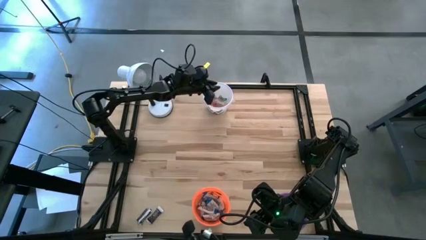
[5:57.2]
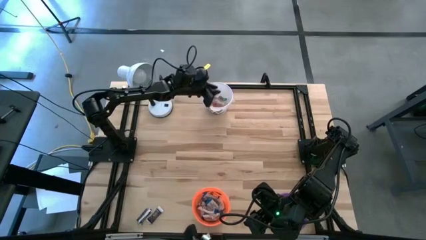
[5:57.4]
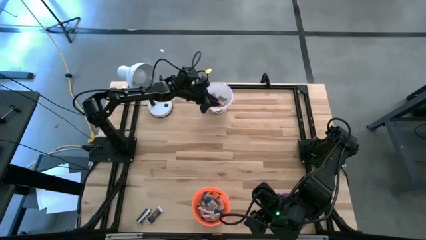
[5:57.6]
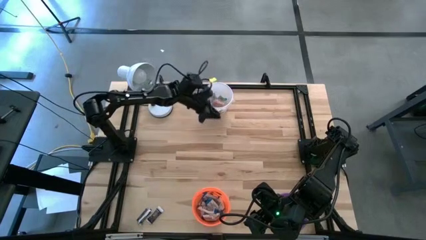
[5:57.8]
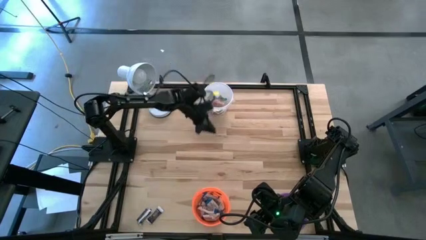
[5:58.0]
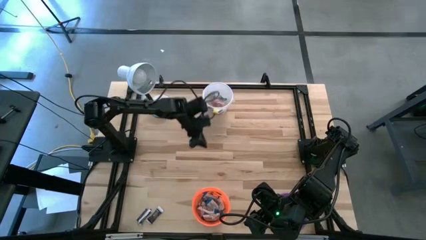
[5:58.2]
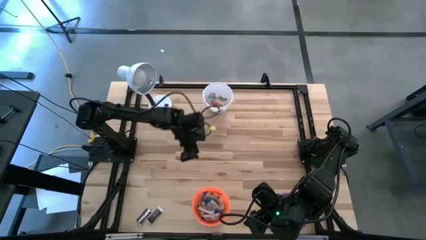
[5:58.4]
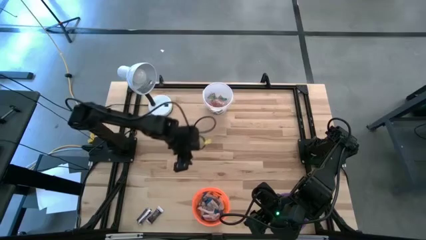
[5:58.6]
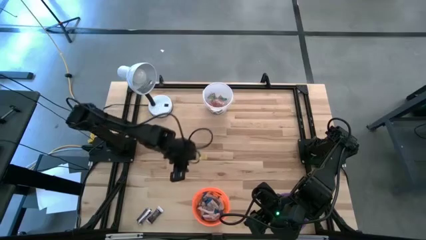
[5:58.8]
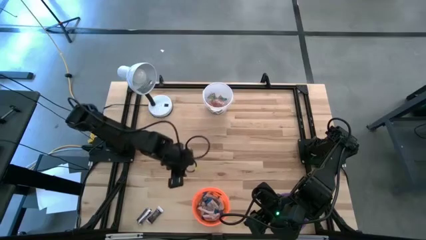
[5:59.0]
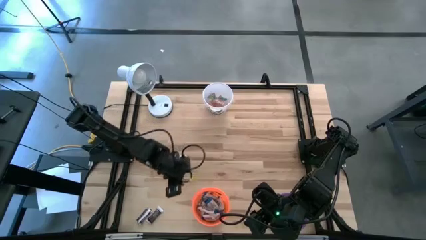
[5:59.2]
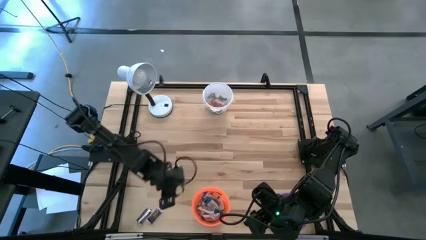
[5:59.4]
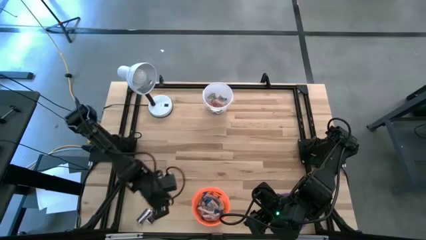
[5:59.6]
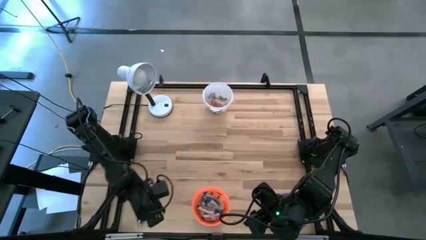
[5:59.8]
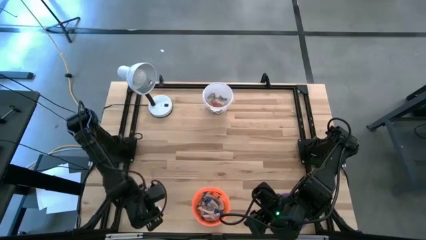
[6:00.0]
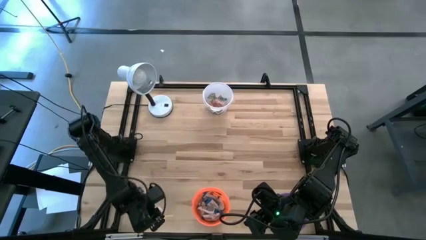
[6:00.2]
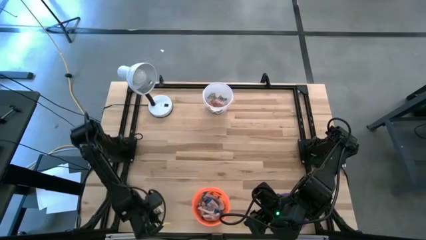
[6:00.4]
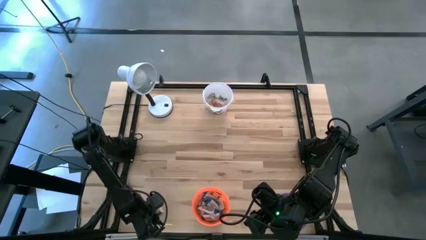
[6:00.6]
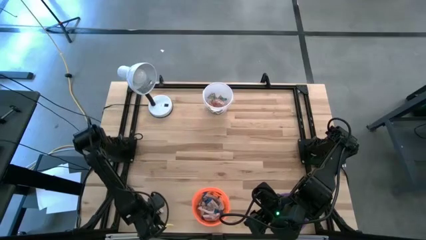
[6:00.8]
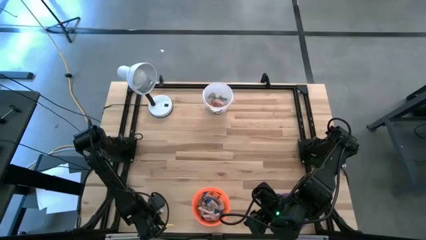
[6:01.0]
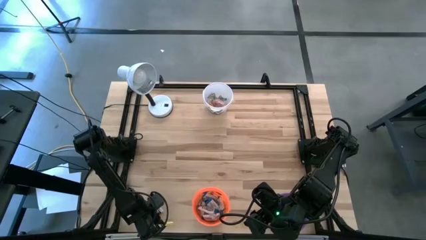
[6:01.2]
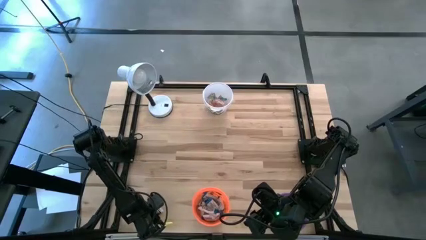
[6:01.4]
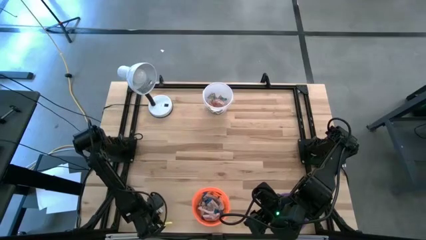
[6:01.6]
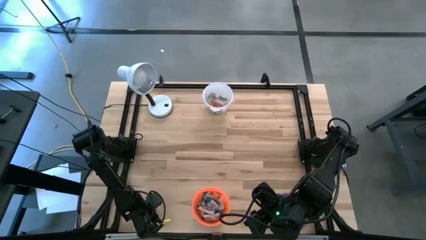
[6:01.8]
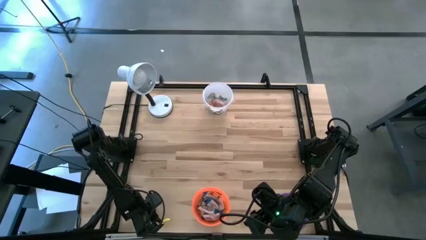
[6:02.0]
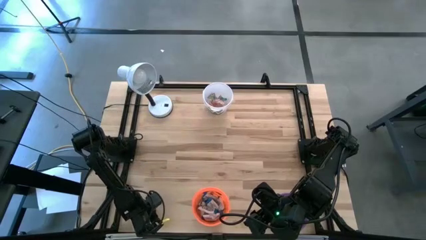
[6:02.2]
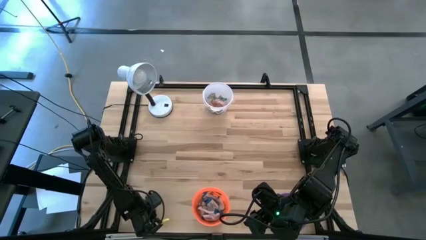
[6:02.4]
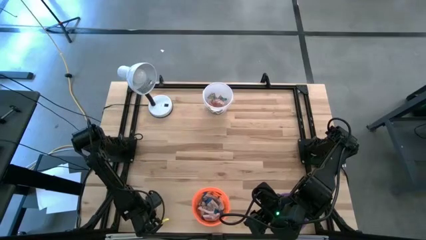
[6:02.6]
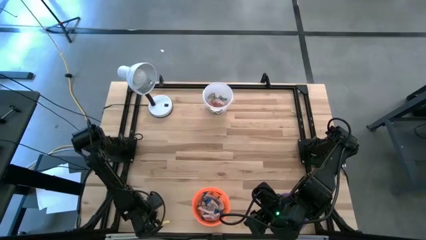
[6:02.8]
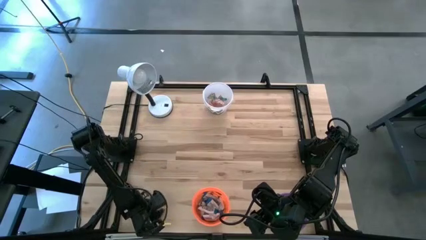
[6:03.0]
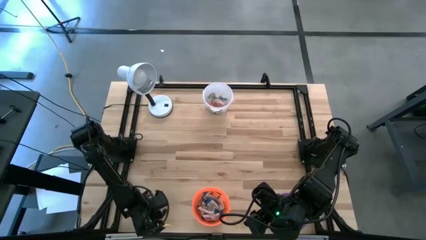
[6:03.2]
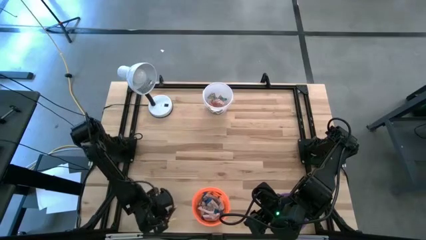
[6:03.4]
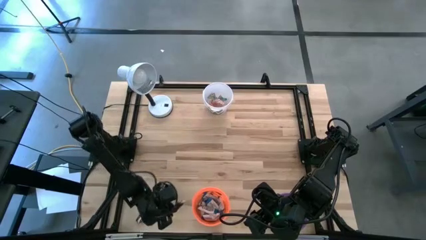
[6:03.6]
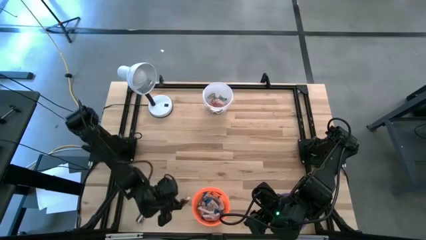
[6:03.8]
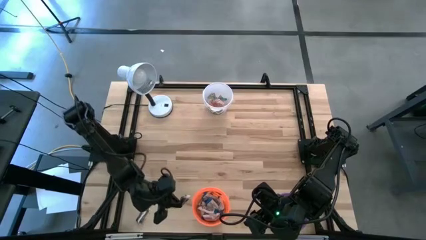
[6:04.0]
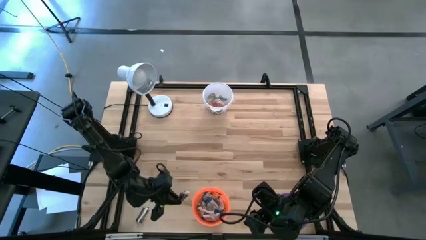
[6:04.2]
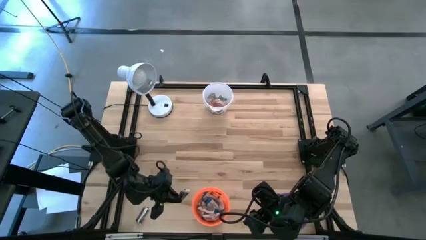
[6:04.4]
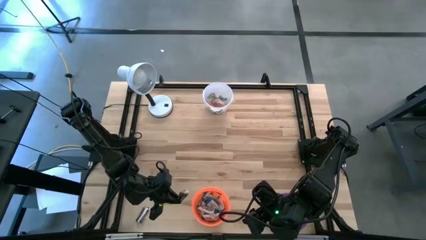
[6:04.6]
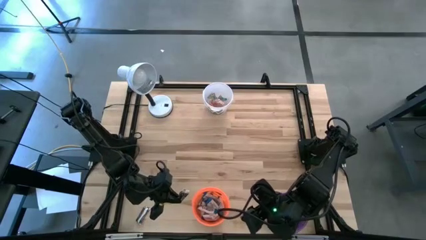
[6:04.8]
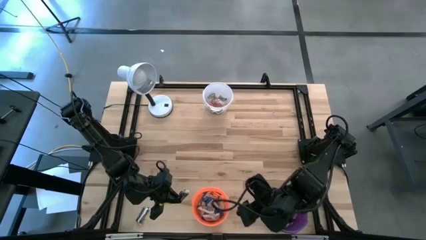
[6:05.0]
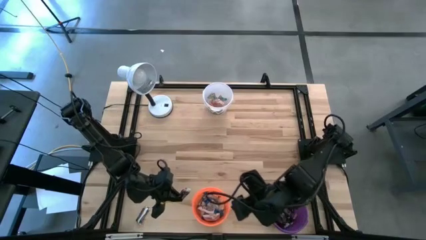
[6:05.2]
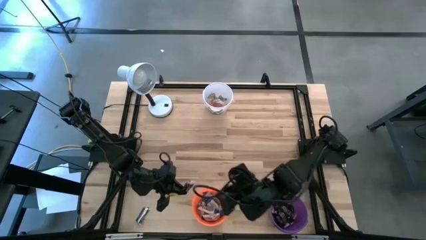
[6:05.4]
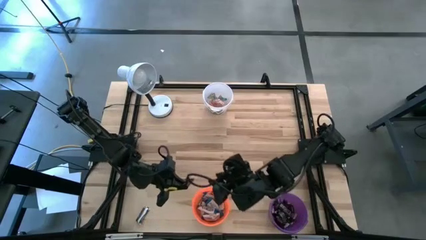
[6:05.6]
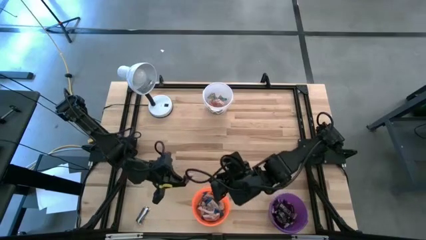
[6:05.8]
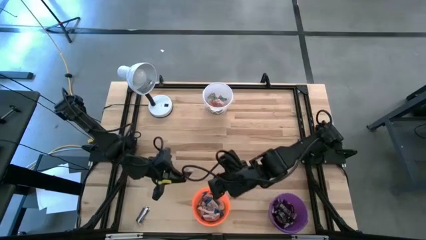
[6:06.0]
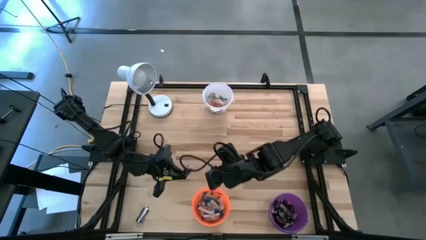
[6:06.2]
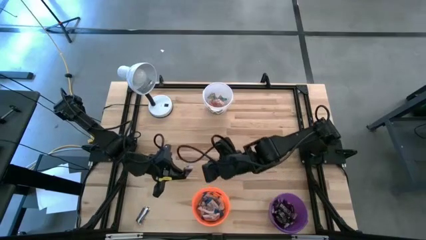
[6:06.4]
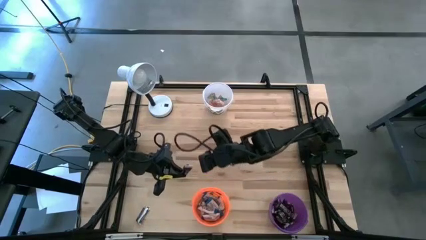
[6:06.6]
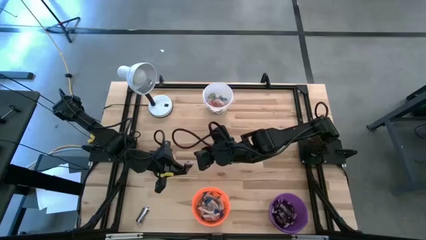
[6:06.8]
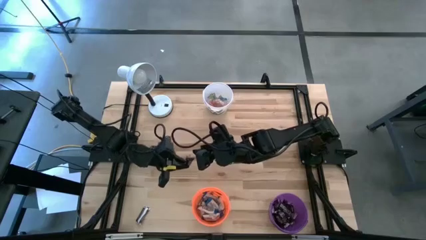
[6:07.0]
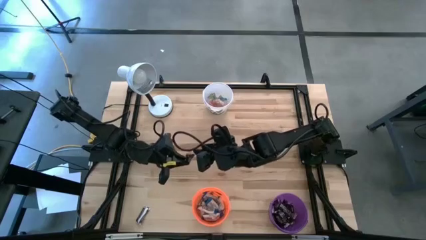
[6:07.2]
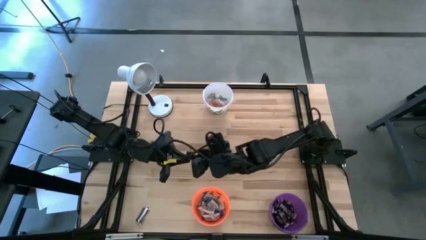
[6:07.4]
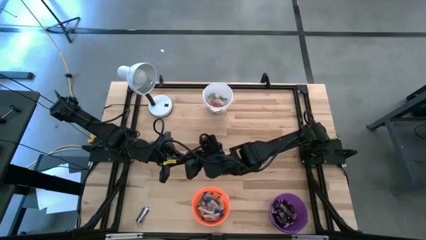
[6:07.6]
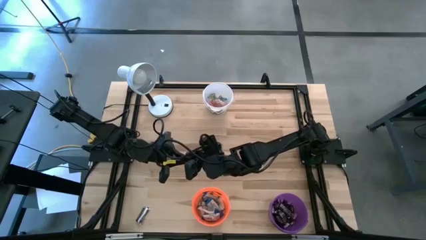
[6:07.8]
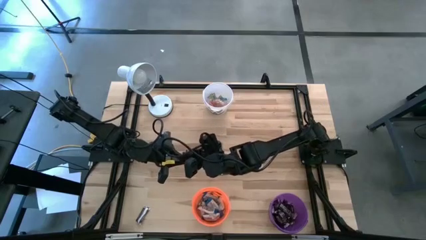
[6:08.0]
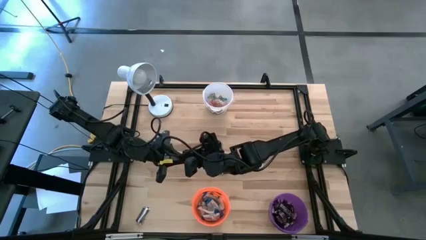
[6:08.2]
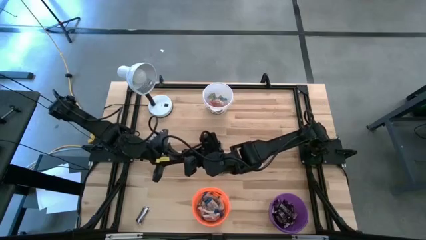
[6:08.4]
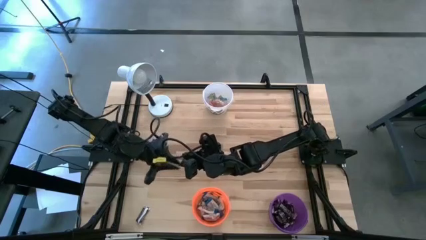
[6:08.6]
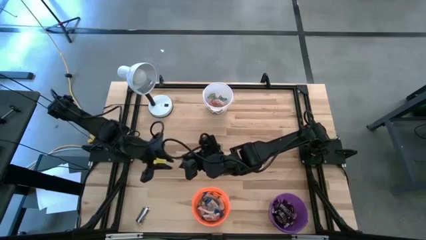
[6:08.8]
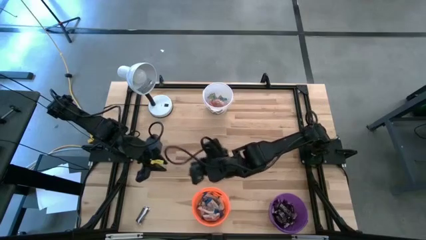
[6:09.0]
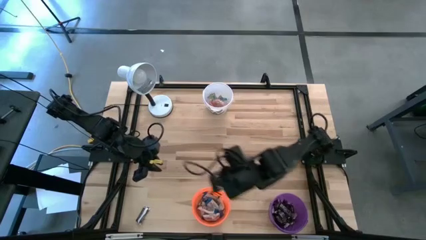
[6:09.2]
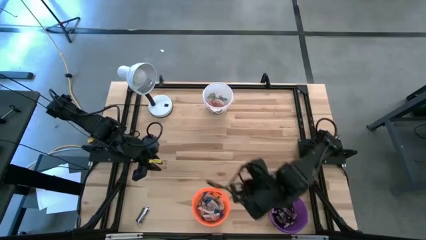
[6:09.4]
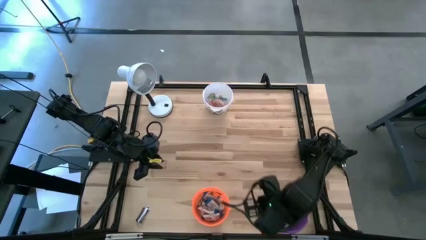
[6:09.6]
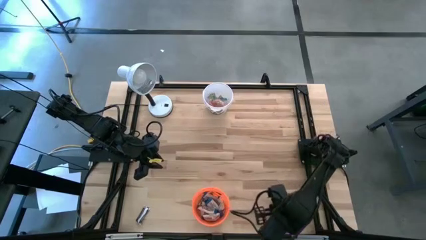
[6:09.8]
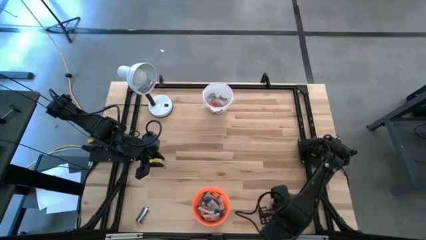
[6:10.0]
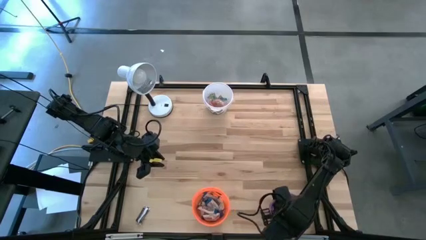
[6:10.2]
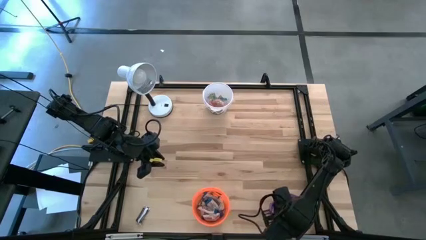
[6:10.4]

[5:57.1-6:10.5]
Task: Organize candy in baskets
Put the dark brown chocolate bar into the dark purple bucket
